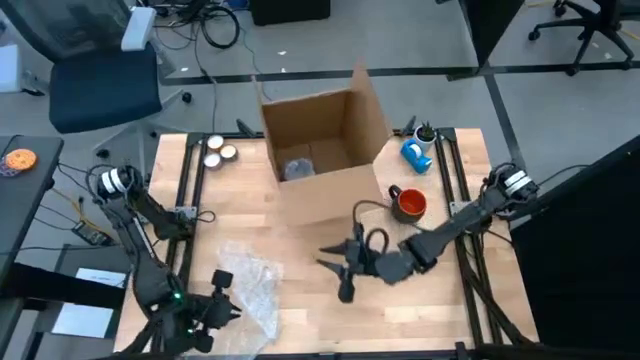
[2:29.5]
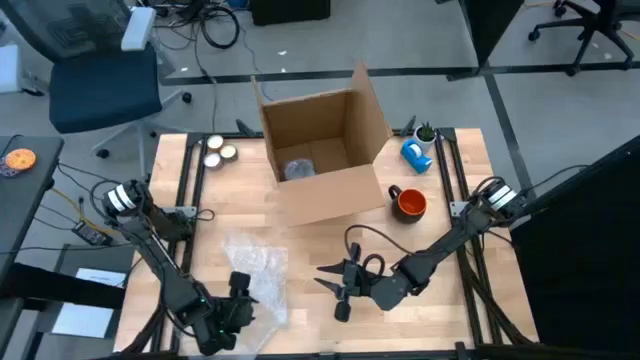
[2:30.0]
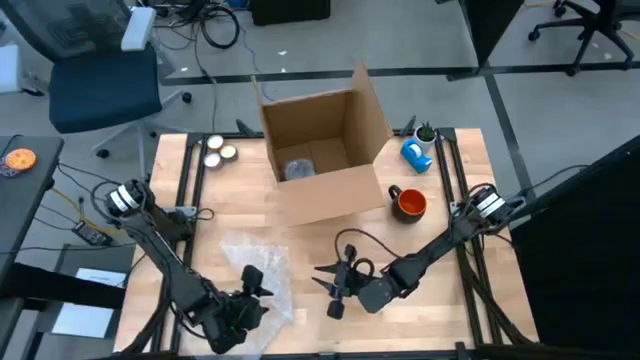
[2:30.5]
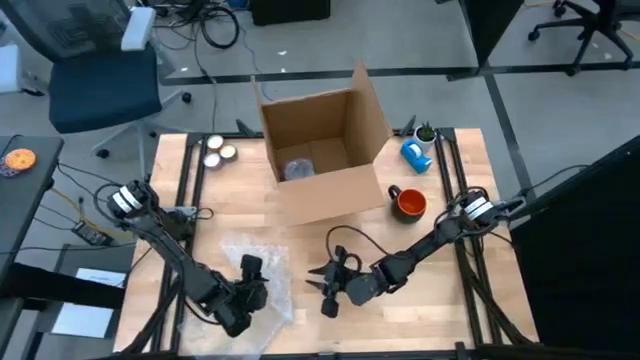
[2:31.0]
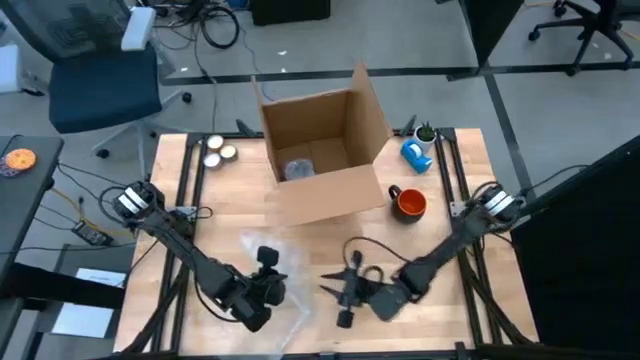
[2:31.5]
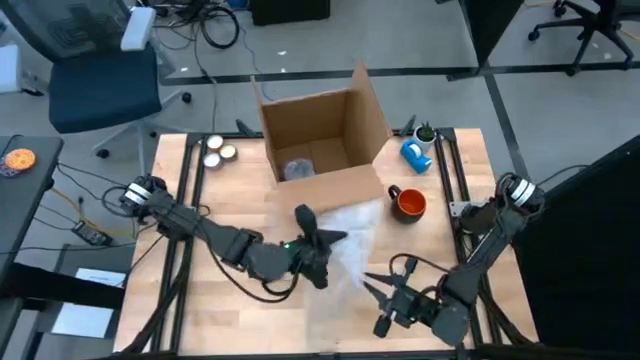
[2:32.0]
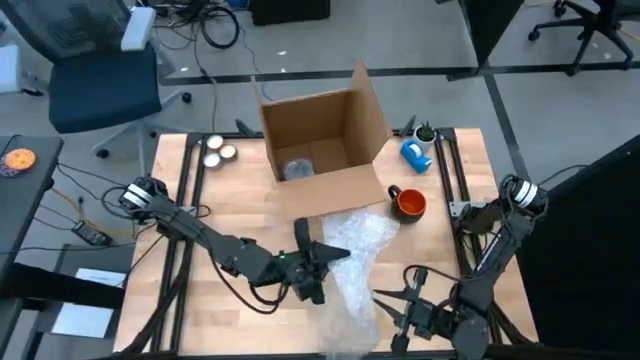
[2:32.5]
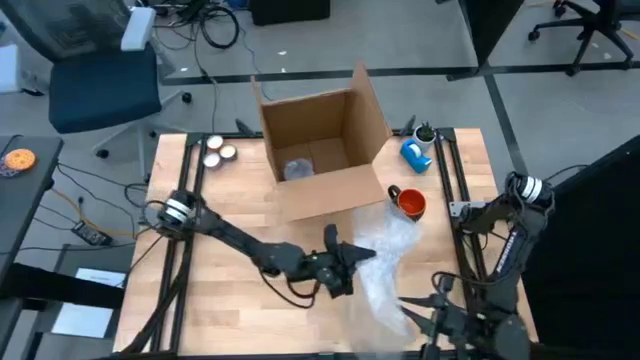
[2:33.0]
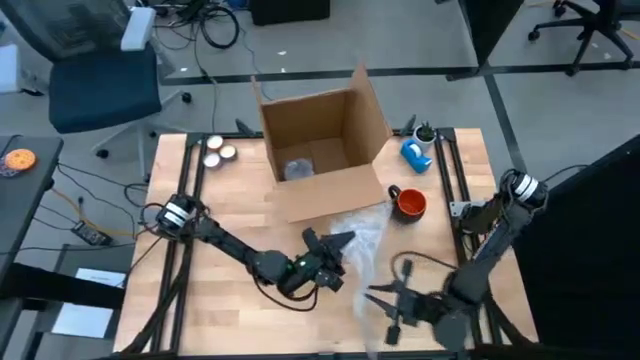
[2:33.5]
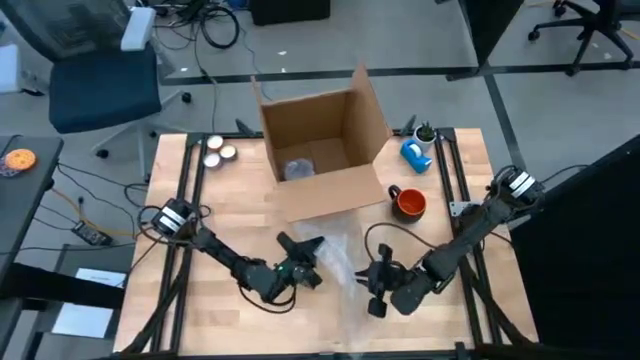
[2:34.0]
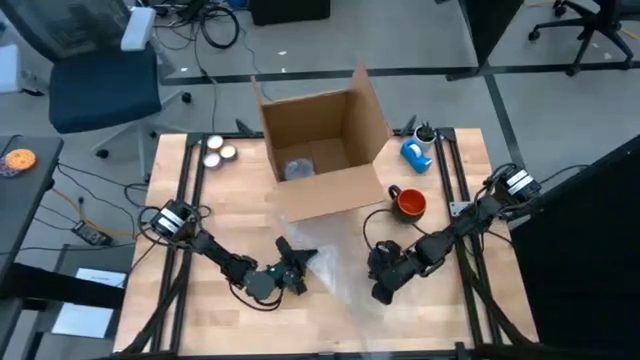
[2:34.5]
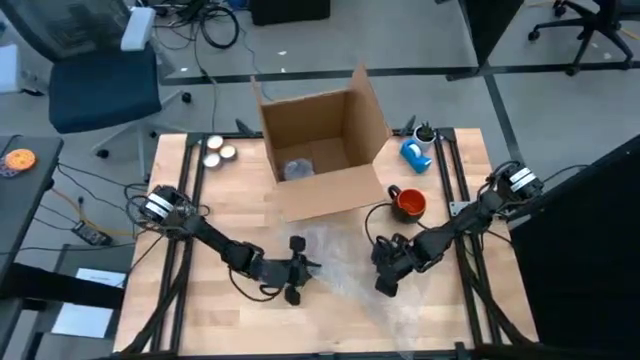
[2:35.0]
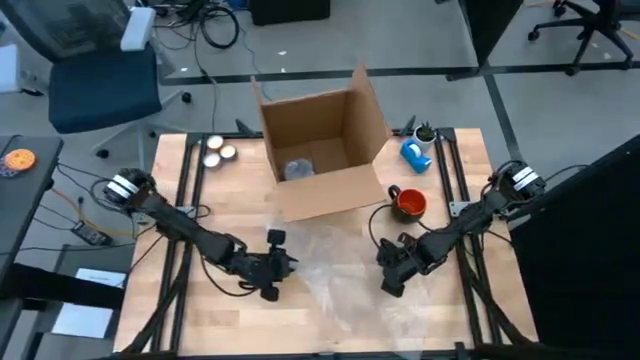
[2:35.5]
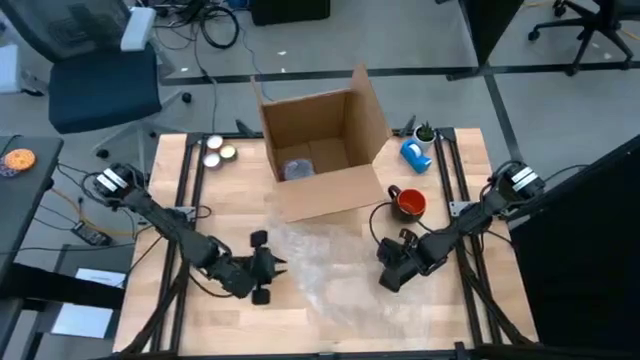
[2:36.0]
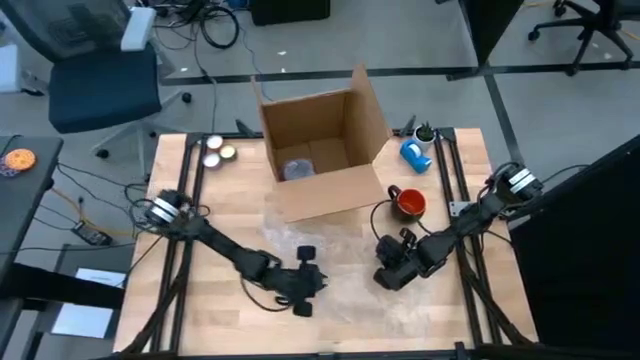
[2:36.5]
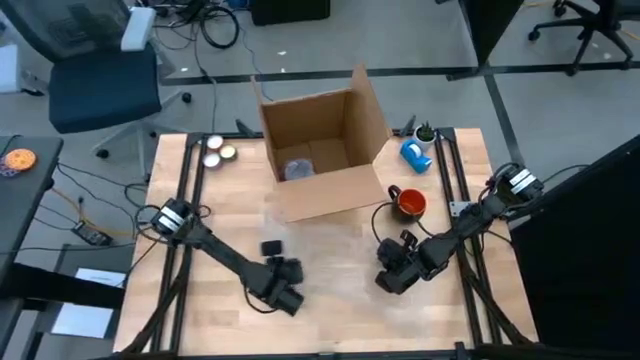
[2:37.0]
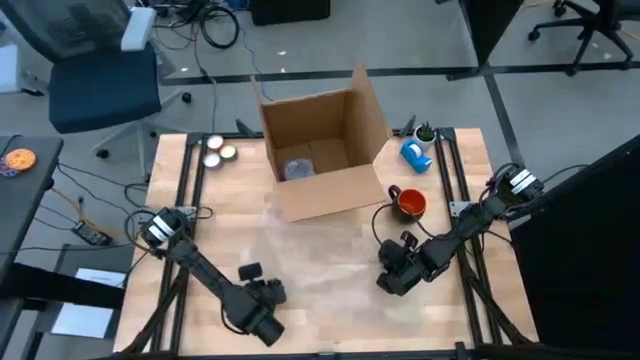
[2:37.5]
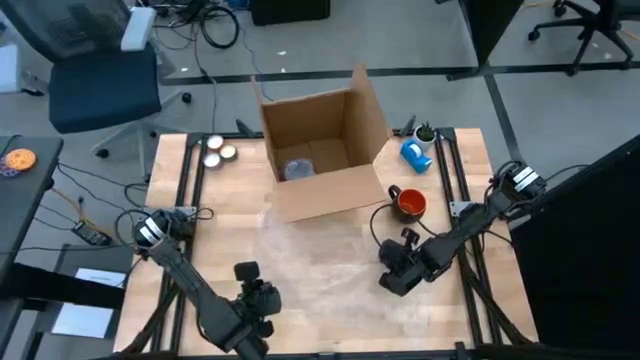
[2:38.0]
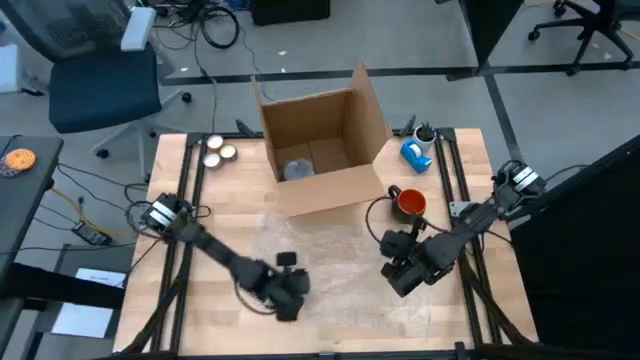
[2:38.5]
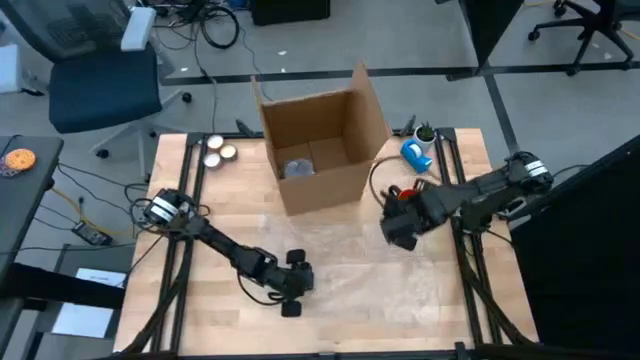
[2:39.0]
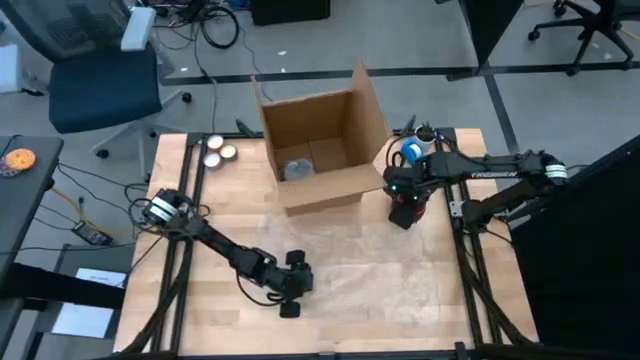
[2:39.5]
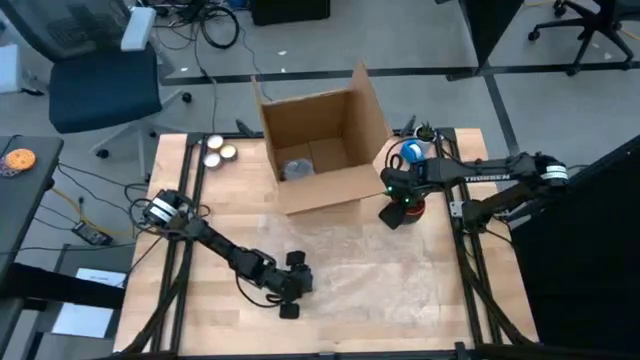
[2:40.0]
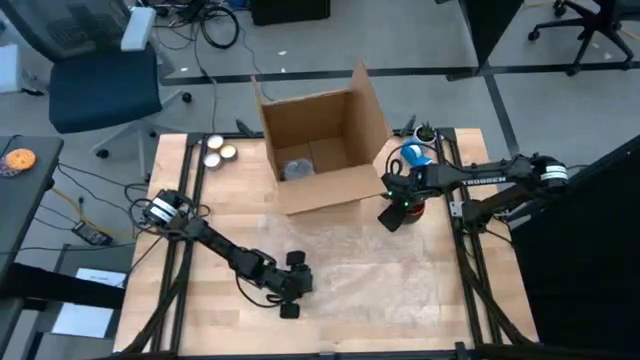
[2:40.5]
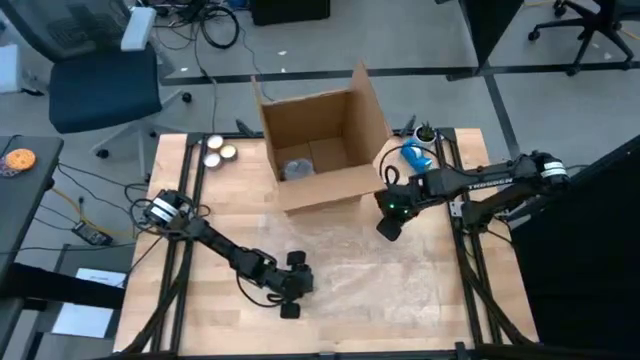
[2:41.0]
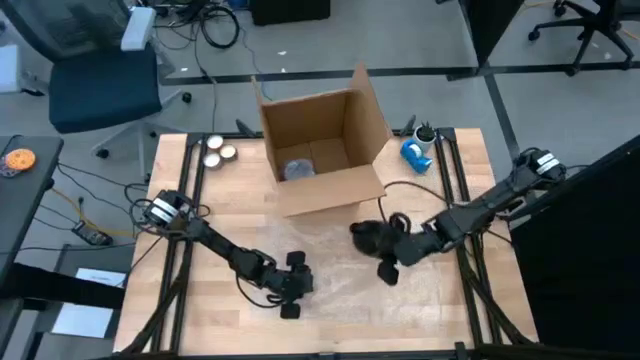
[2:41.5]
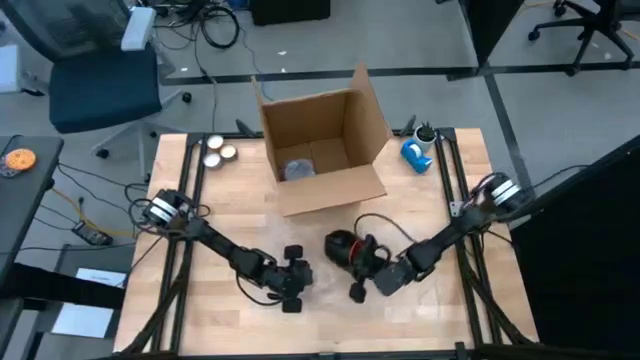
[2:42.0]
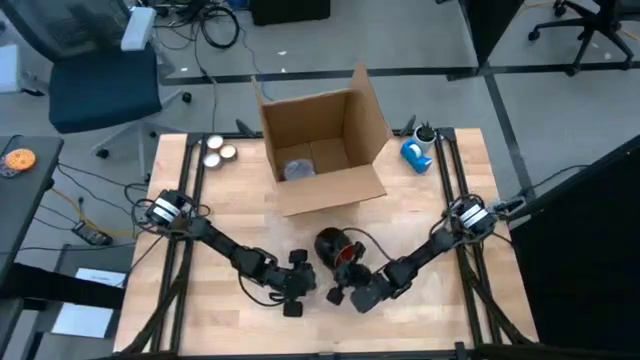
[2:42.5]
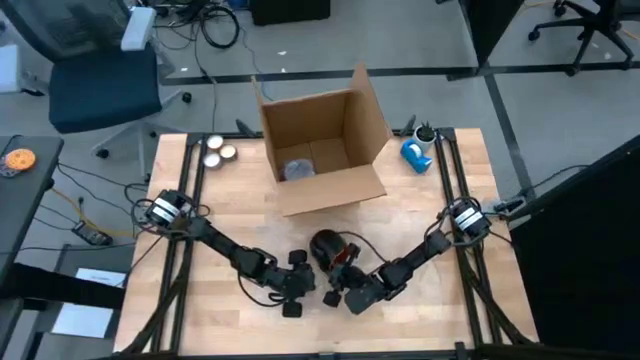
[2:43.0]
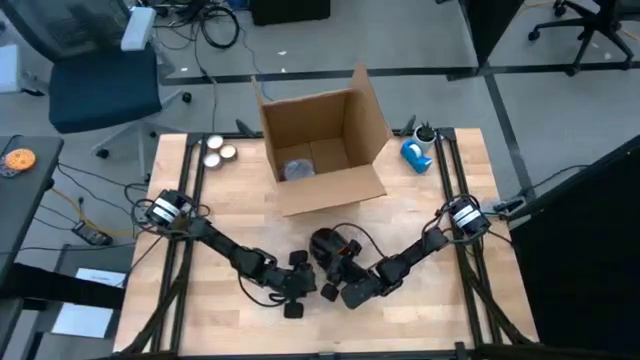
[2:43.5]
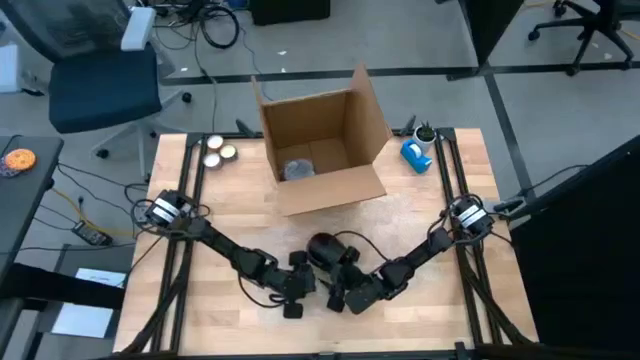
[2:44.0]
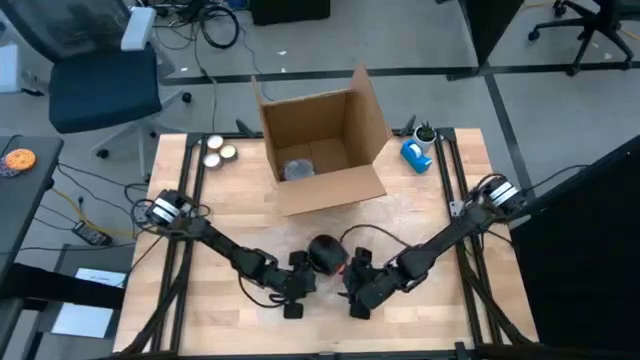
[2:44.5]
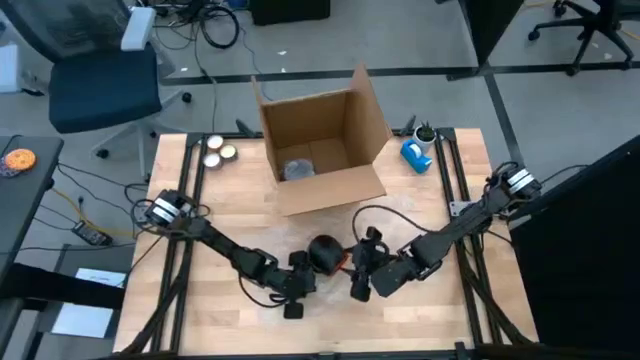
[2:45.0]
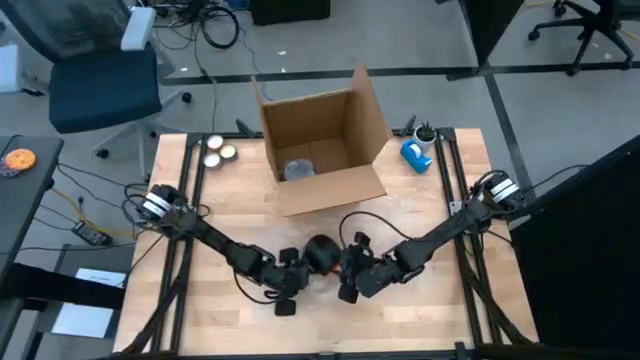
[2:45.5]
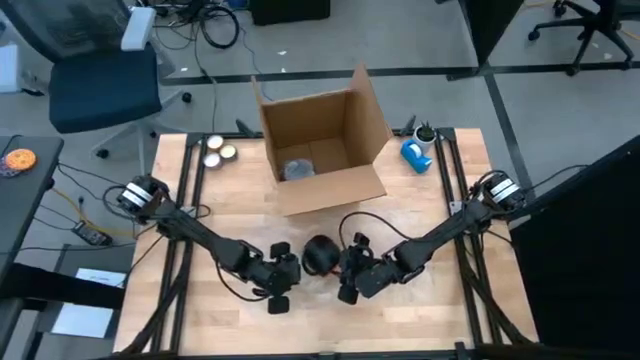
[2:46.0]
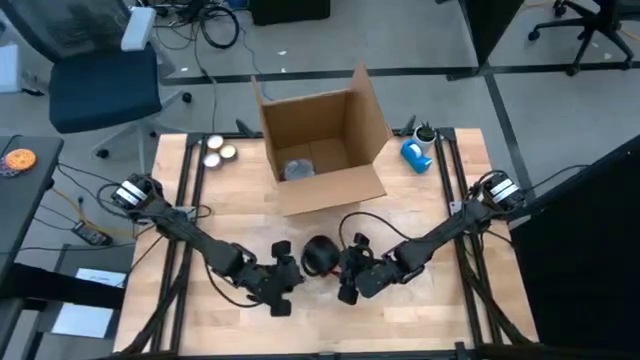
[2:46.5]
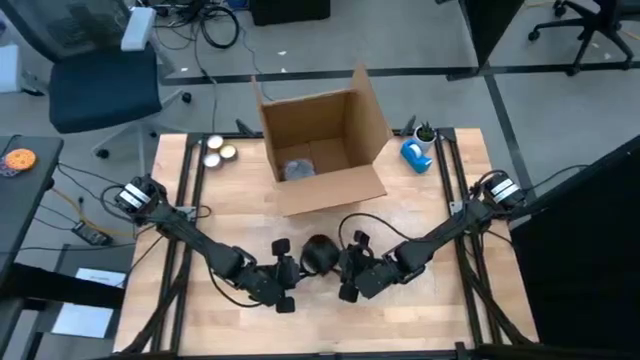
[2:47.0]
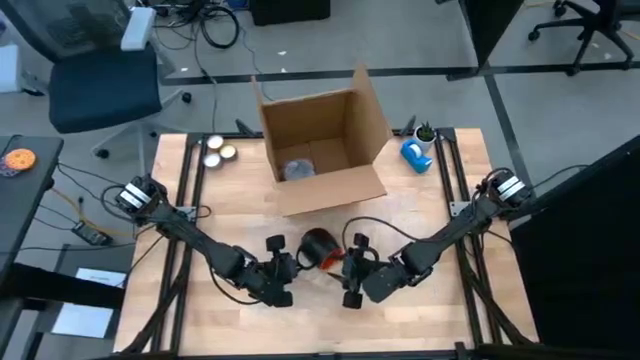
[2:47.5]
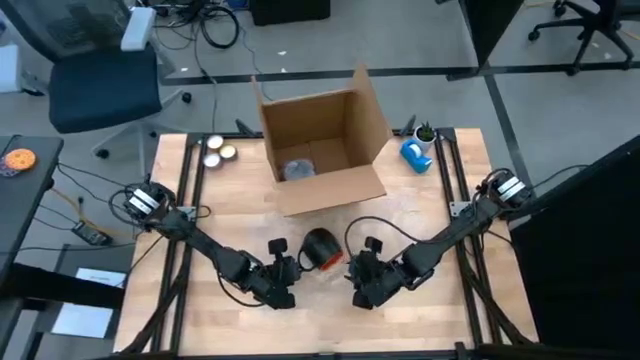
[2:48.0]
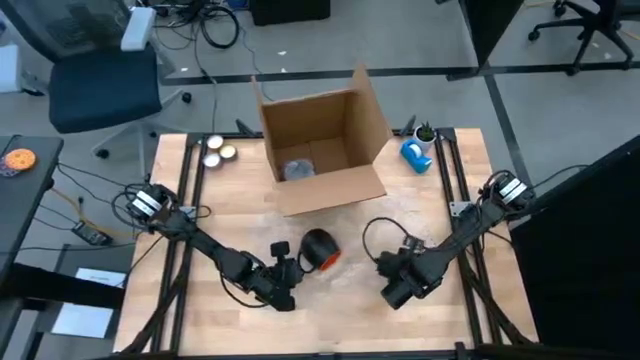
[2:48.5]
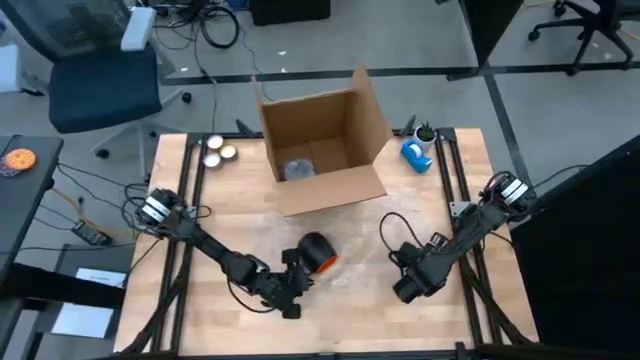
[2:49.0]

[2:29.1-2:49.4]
Task: wrap mug
Wrap the black mug with the bubble wrap
